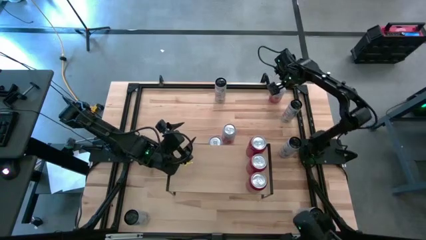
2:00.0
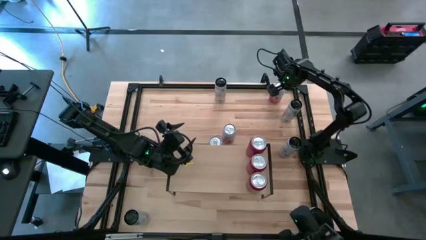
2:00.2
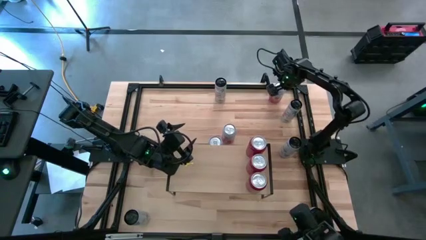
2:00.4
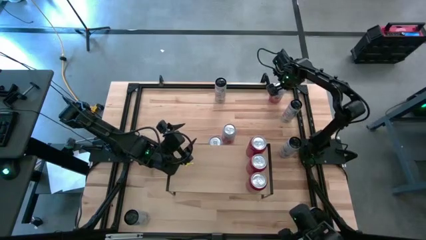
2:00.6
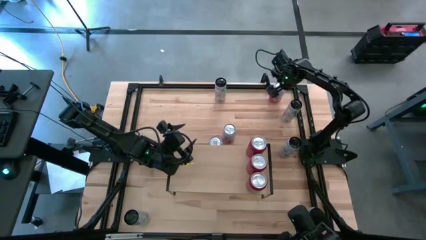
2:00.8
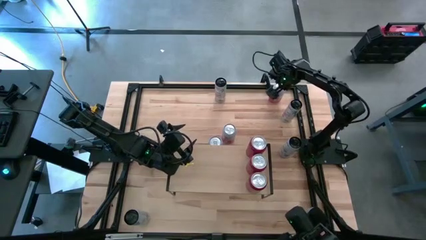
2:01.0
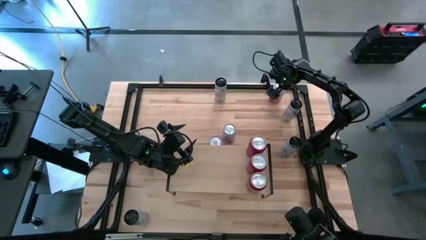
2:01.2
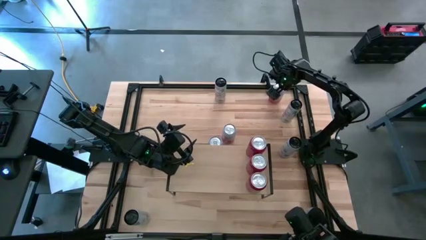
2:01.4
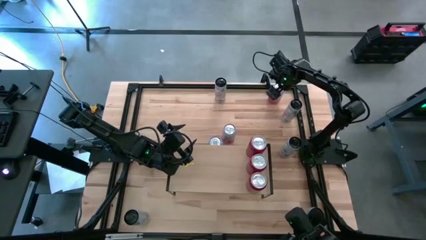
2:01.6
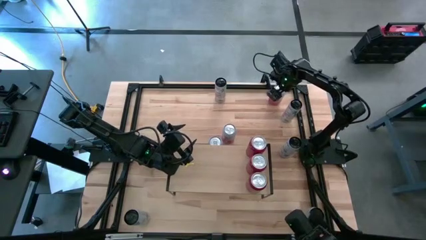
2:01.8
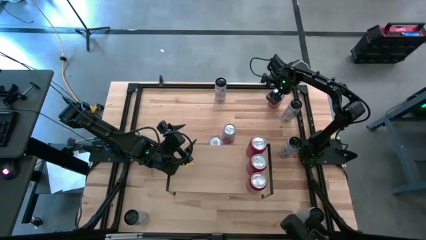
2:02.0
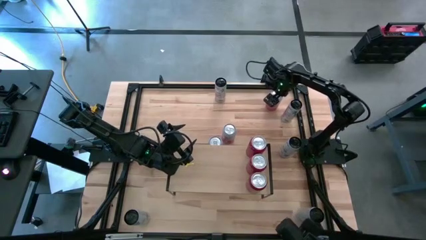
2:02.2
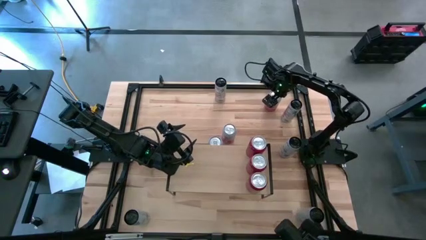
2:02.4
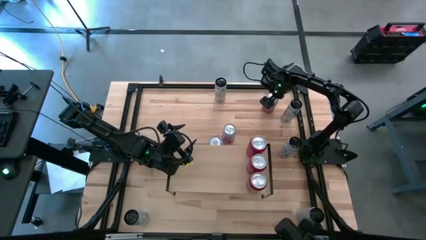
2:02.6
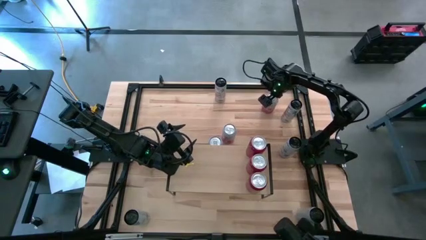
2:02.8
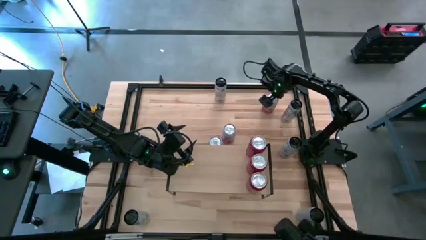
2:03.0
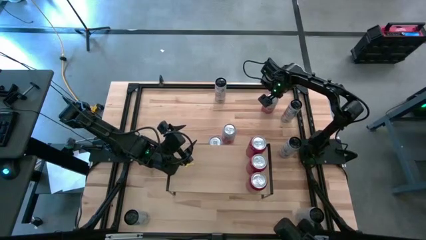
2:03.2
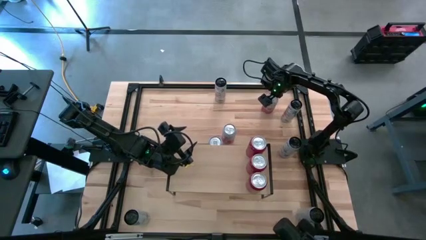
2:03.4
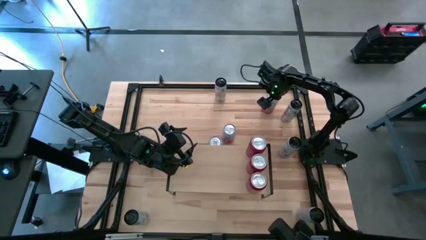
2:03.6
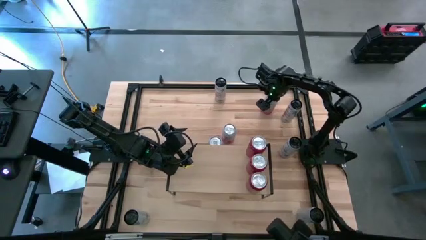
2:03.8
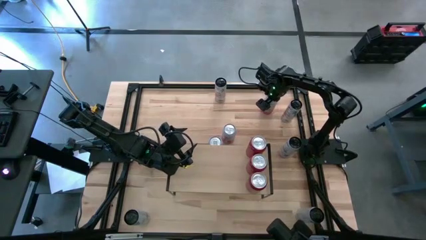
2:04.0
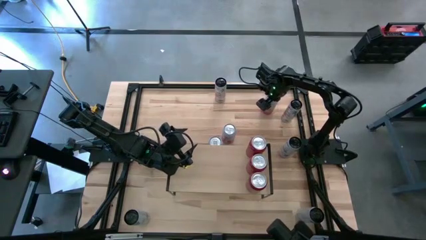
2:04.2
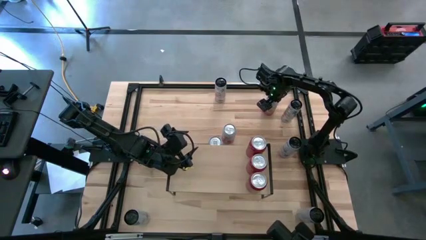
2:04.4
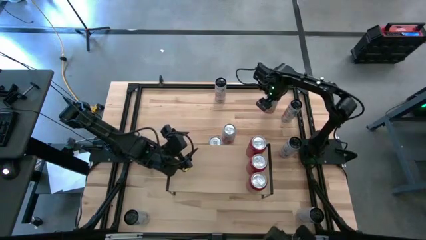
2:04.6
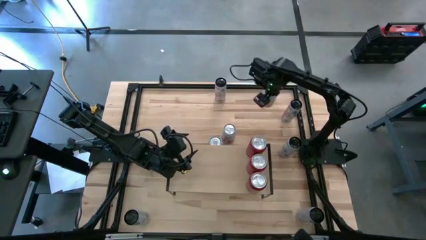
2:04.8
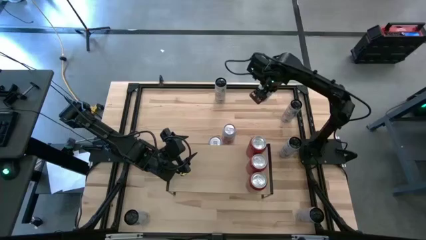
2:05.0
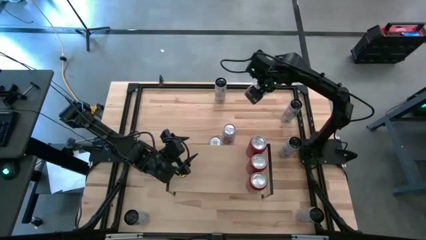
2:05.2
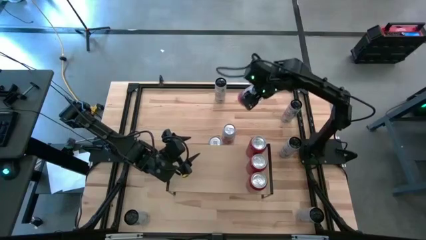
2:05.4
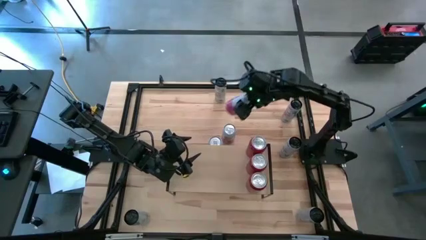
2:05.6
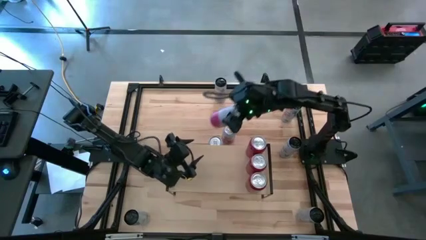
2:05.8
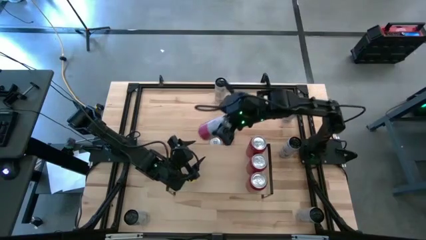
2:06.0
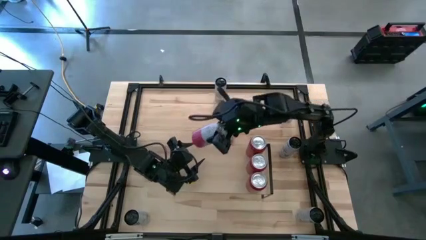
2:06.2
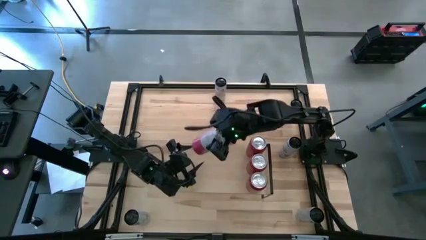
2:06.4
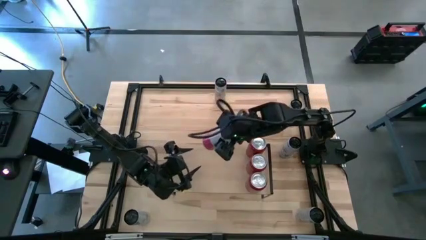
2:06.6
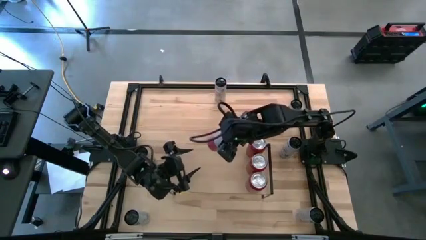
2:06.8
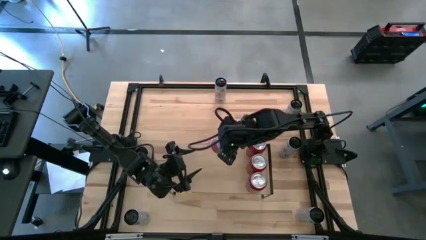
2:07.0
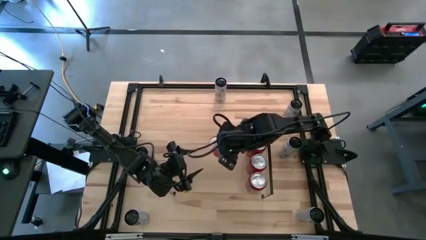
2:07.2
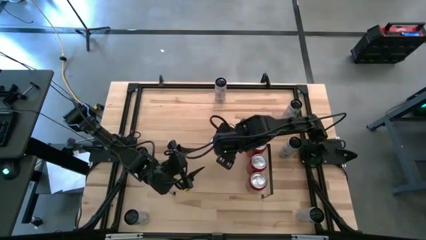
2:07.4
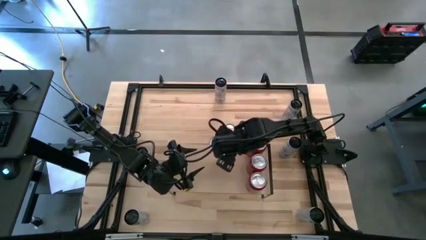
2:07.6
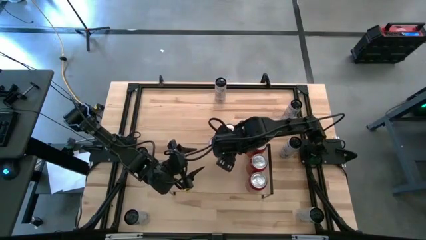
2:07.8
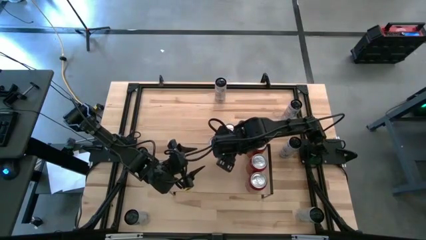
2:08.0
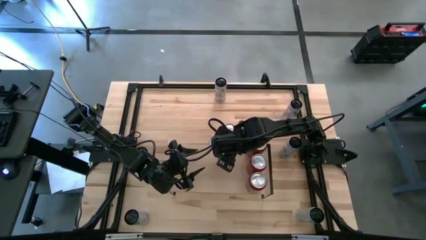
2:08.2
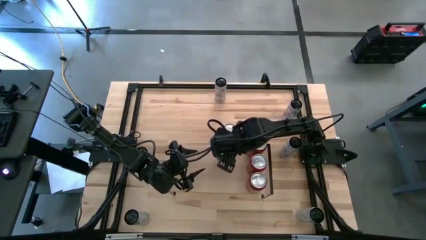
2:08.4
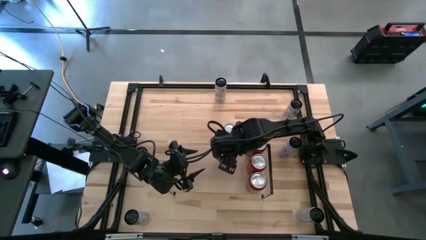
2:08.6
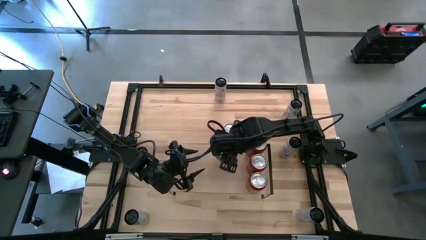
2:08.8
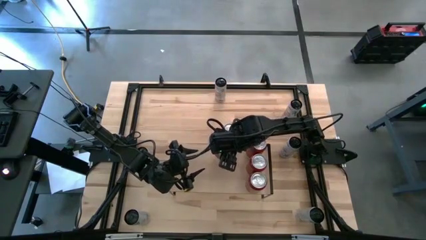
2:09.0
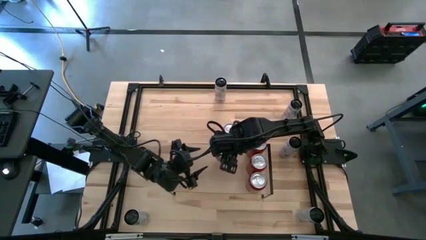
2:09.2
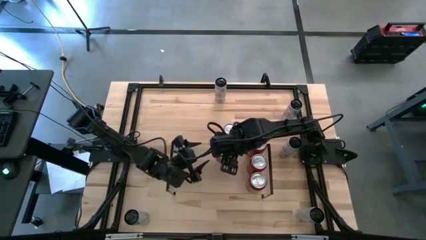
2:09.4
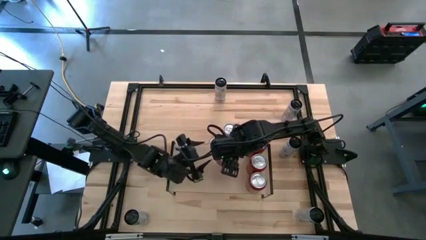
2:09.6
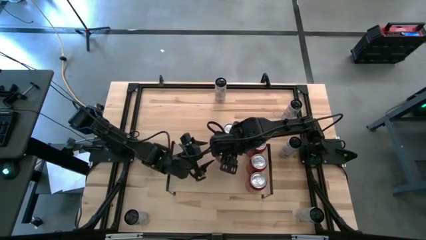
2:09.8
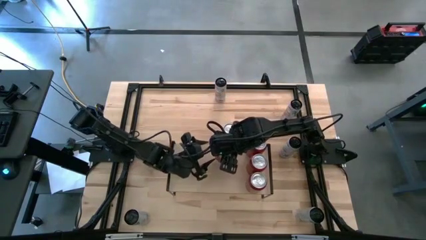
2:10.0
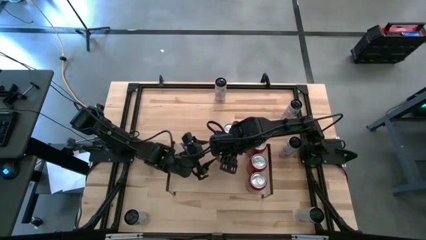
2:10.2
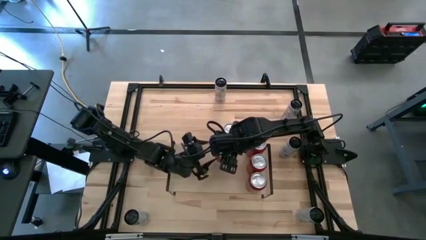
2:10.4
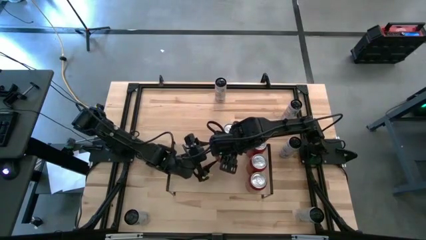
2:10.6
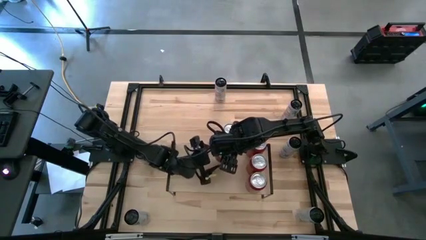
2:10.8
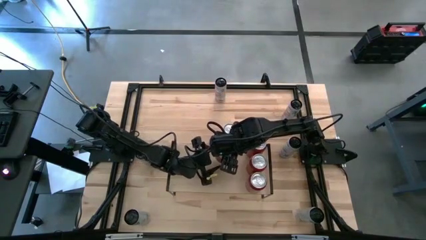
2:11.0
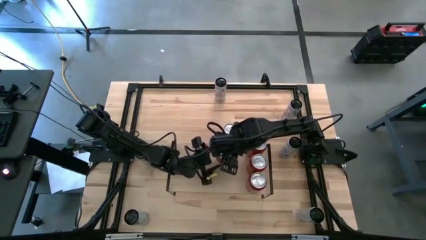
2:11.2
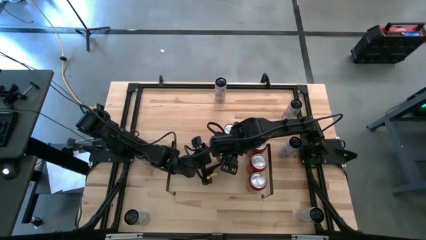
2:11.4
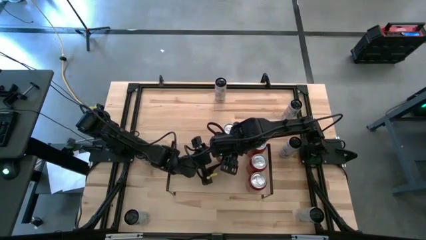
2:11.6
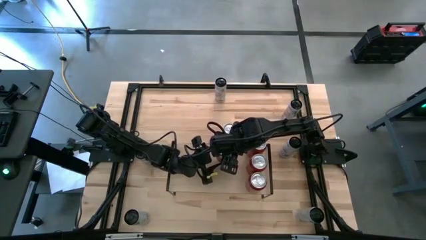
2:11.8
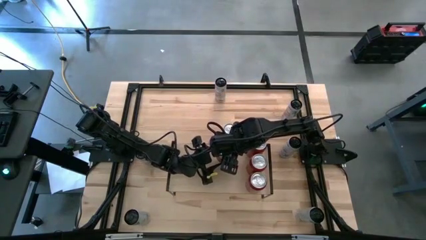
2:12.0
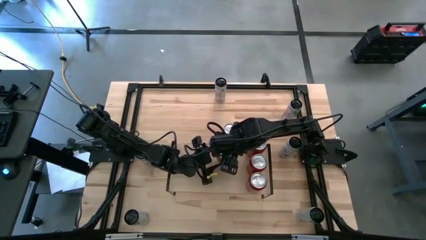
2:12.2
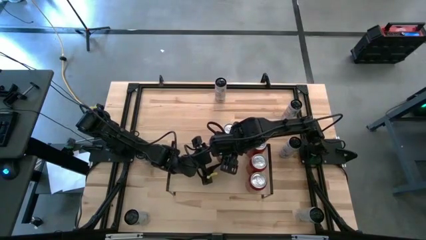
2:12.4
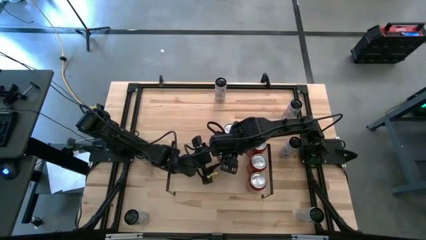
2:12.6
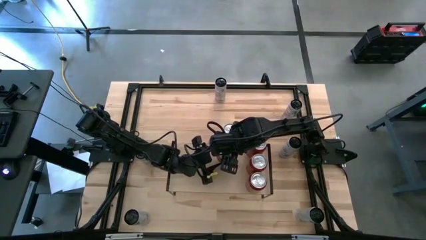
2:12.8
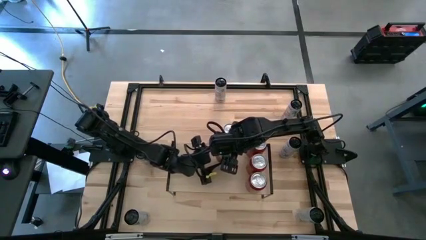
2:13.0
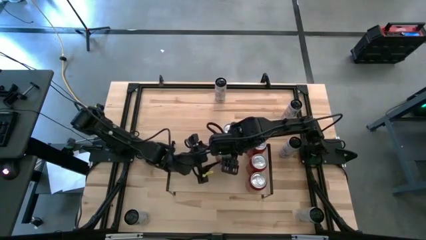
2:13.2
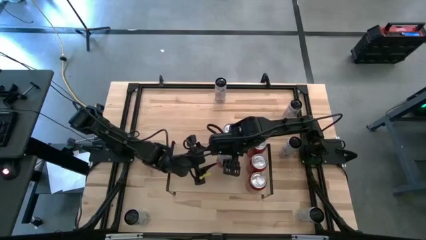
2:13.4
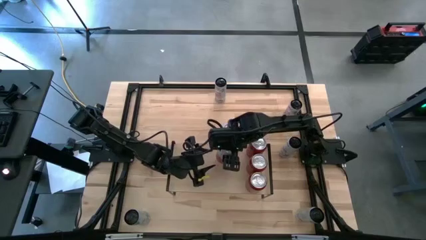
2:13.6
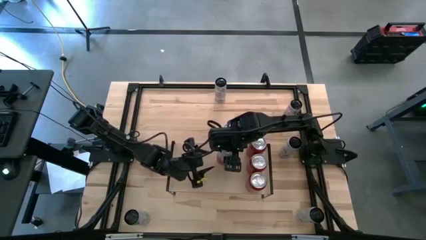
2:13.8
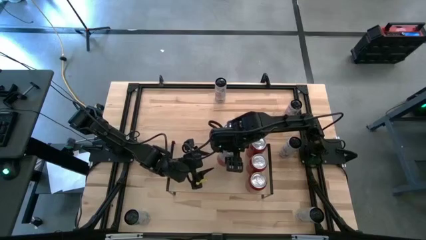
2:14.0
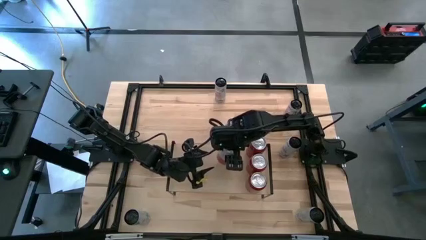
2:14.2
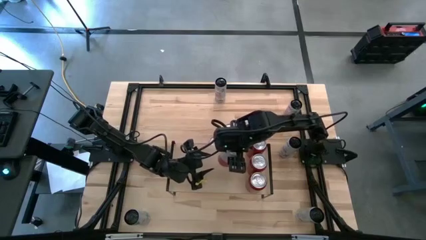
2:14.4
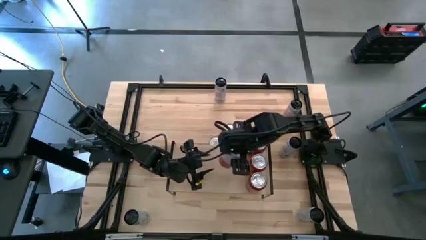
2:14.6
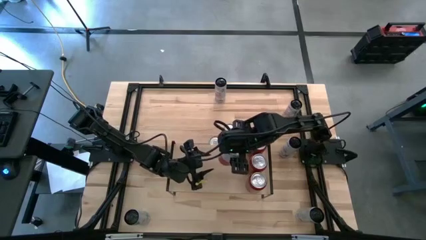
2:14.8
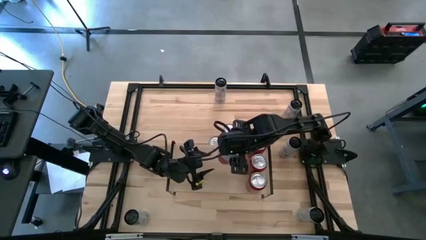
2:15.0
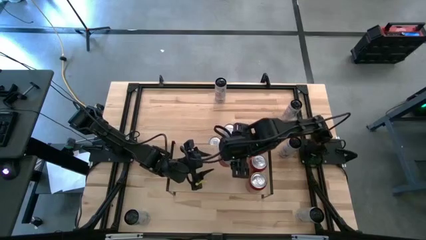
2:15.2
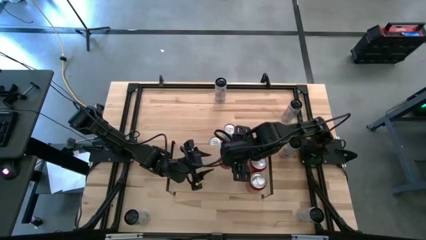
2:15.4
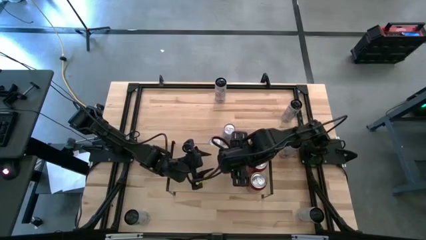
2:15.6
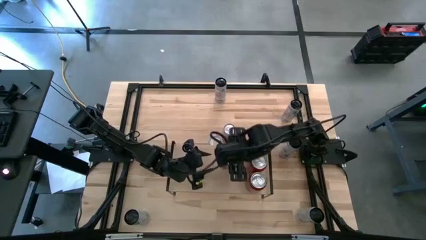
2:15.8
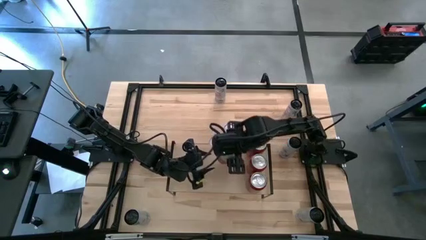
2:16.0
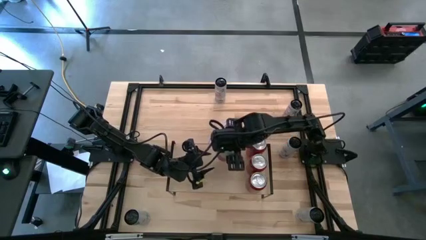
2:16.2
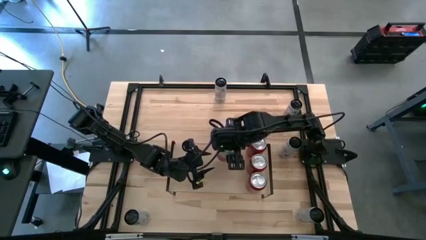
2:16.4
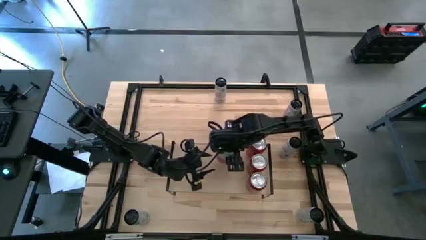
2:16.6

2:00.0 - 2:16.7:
Task: Place canned beverage on shelf
Put the top pink and white bottle on the shelf
